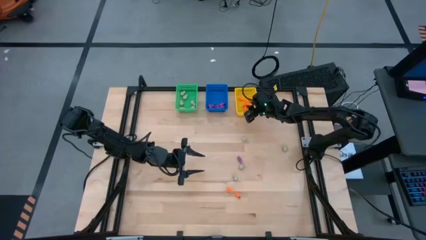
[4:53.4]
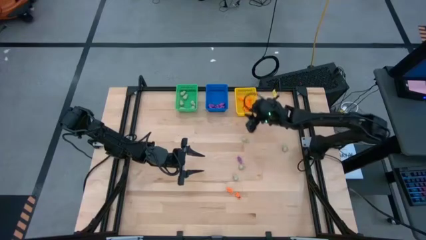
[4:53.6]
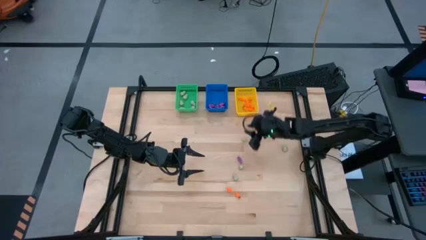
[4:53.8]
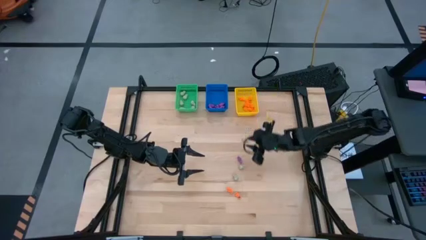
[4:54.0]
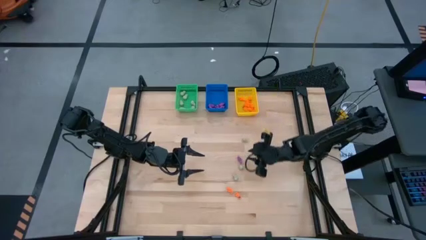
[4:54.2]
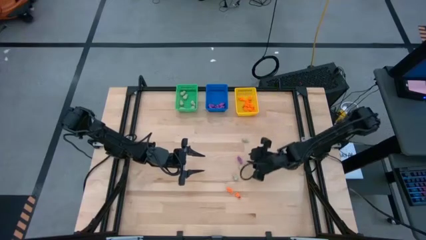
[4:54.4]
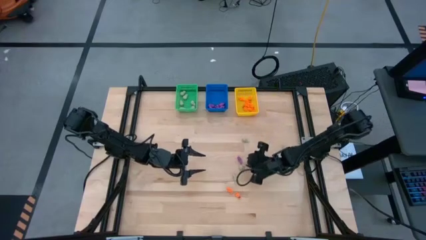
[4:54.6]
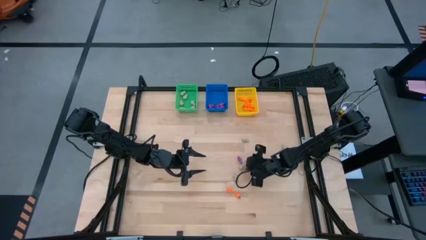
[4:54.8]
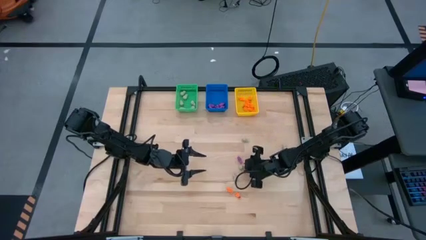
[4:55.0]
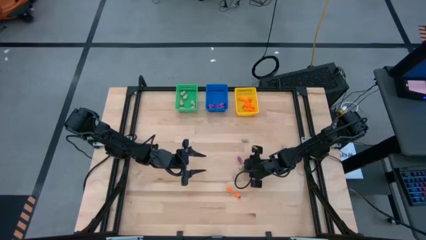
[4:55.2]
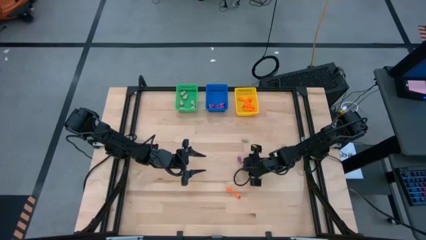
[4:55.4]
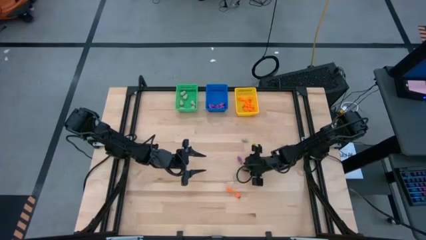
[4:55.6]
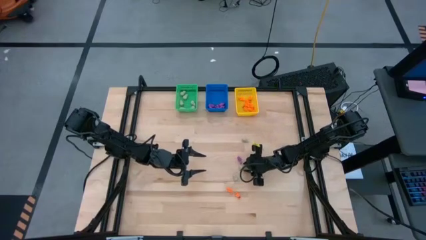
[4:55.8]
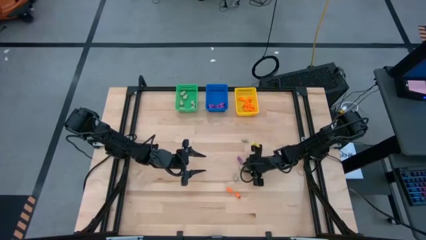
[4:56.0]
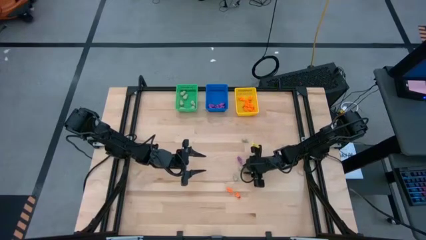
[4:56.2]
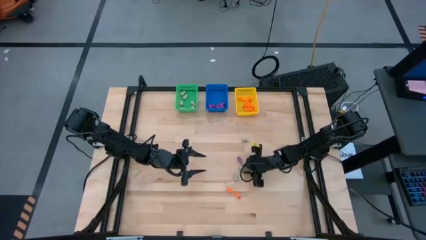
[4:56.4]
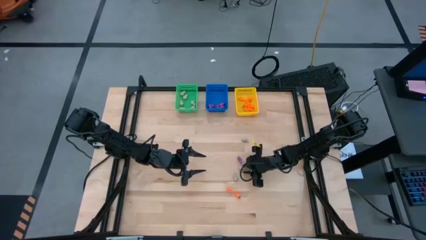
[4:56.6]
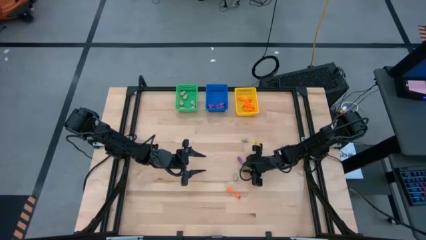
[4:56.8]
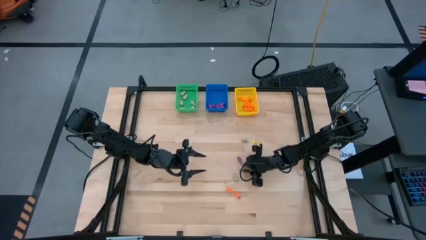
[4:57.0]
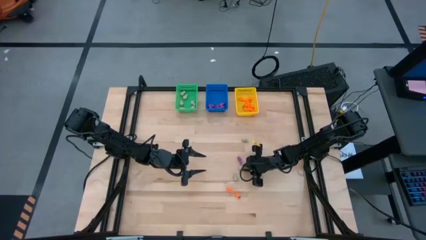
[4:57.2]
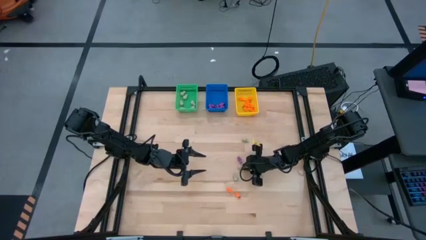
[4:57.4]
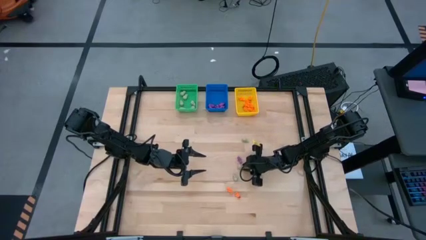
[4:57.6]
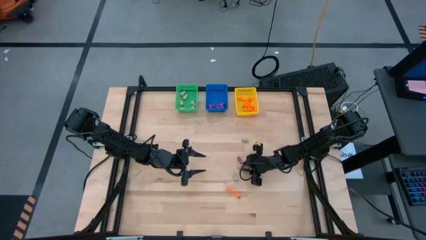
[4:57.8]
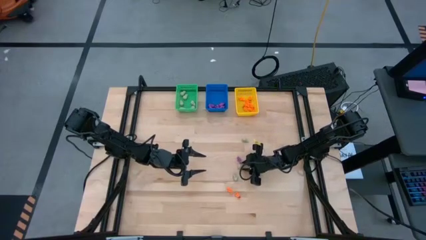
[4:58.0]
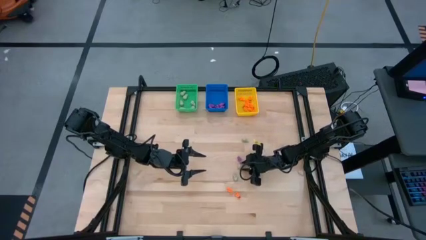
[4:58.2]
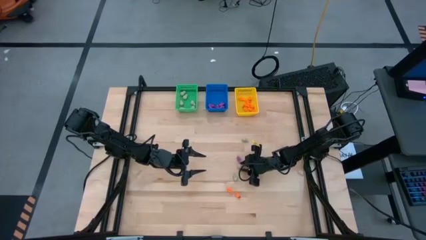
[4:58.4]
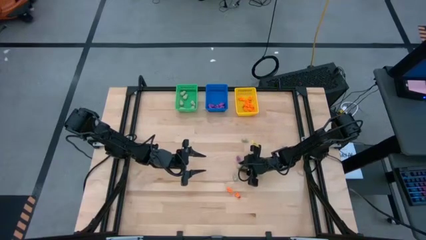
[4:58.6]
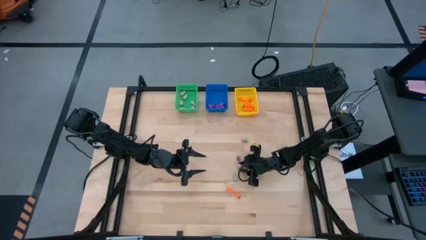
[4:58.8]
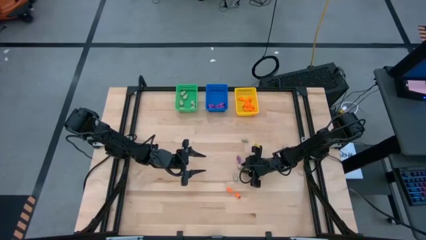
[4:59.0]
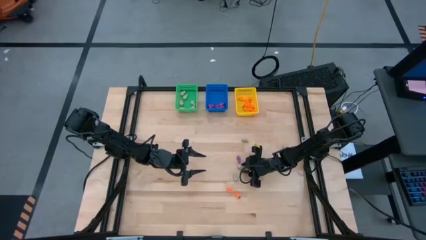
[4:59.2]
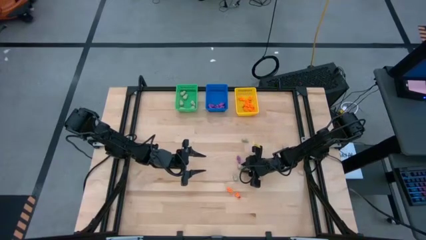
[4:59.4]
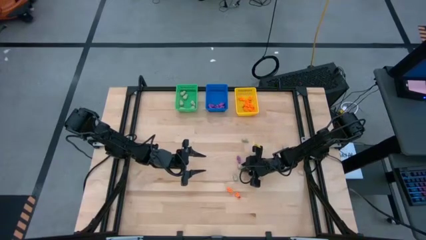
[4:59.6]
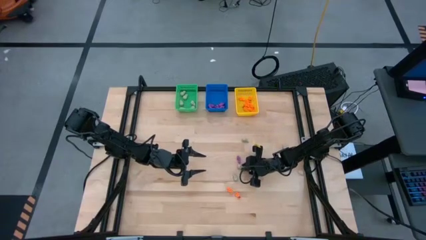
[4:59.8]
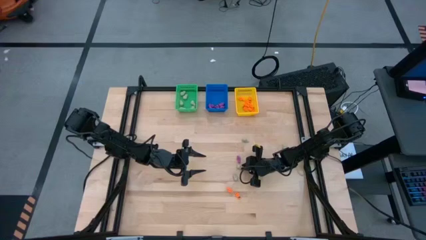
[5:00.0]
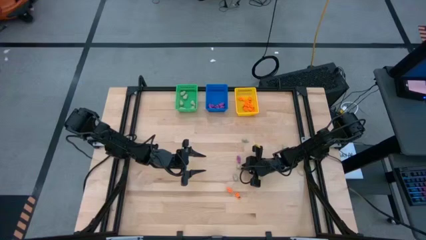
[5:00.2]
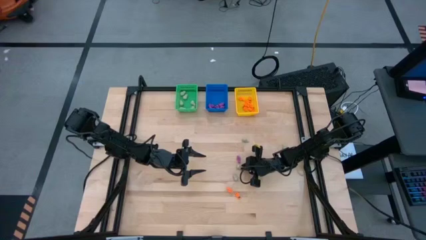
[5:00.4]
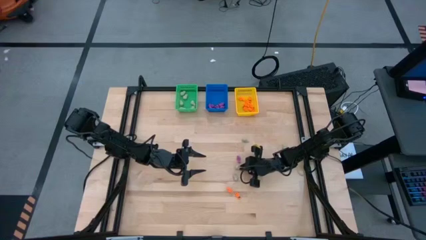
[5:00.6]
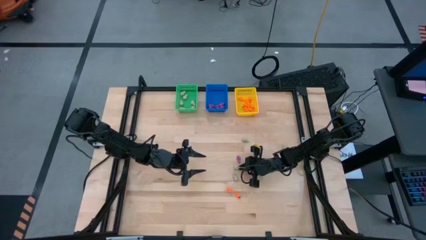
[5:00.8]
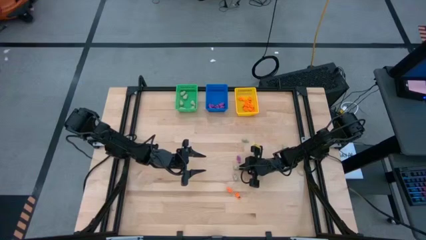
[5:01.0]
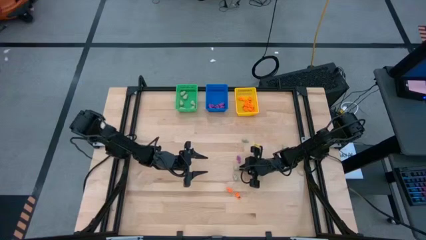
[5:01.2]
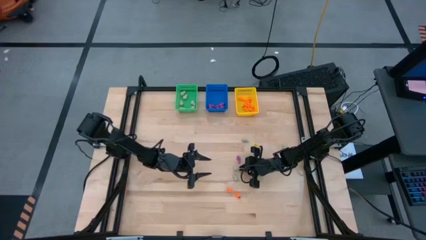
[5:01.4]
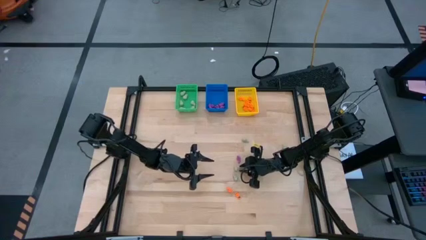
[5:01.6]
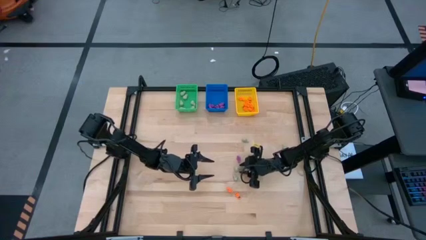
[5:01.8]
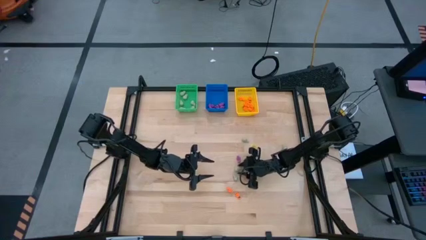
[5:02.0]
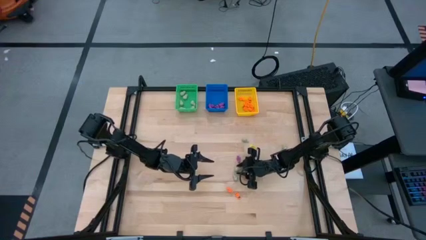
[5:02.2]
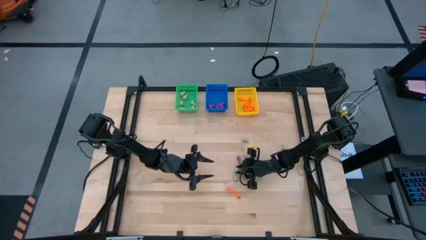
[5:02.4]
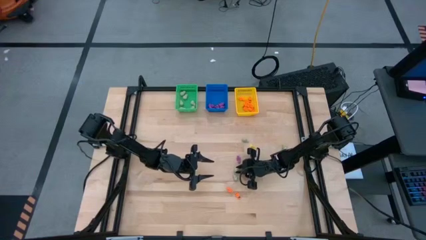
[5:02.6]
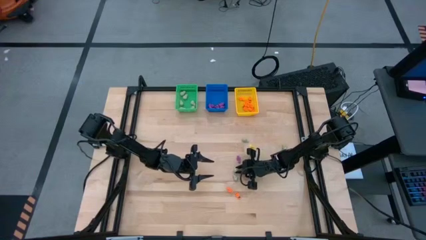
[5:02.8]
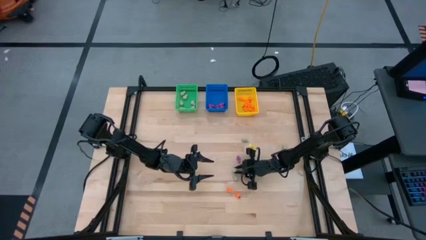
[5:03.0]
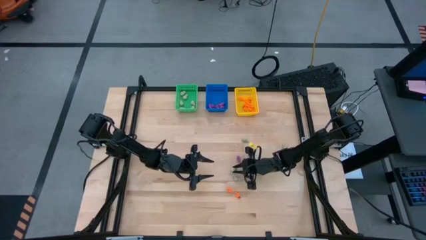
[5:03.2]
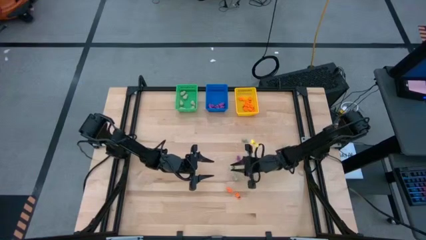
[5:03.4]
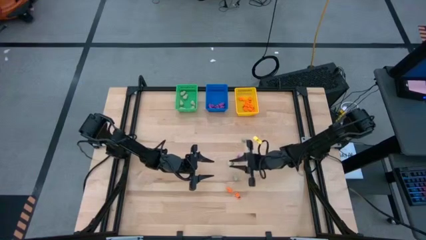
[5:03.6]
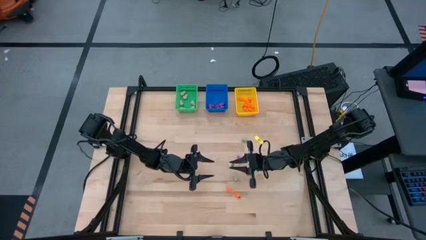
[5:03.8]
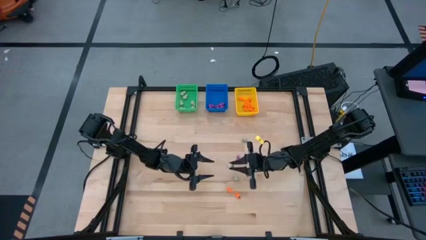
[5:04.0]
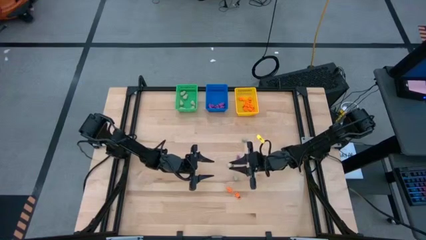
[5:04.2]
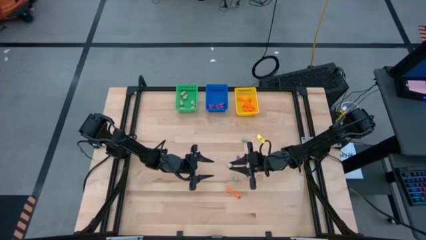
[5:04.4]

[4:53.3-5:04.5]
Task: Sort Halloween decoration
Put the gray skull toy into the green bin

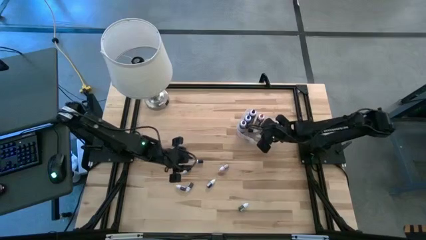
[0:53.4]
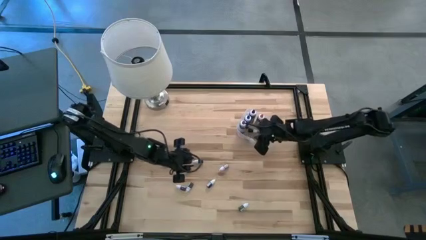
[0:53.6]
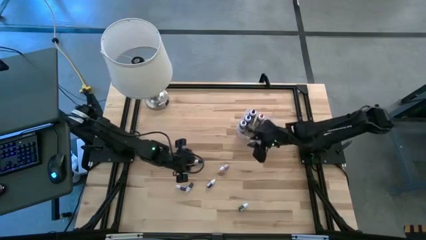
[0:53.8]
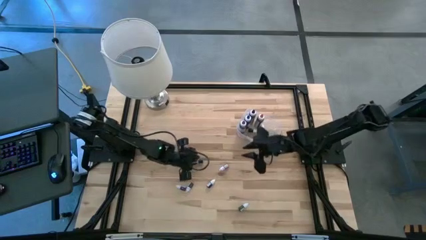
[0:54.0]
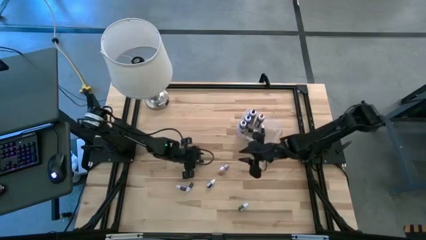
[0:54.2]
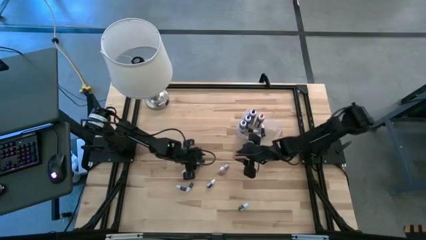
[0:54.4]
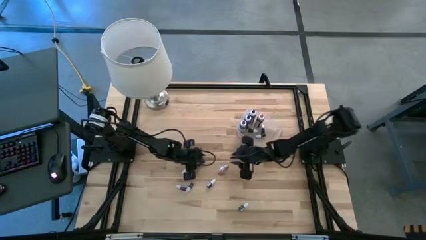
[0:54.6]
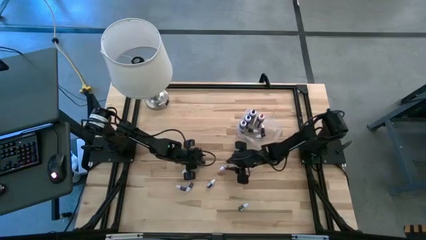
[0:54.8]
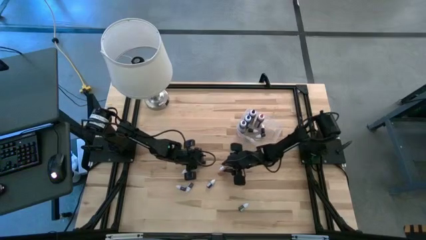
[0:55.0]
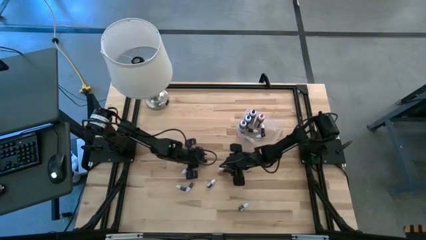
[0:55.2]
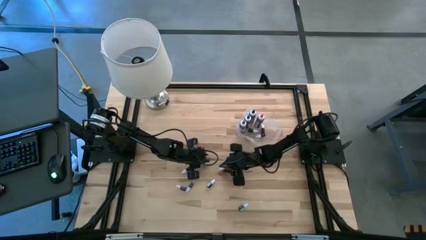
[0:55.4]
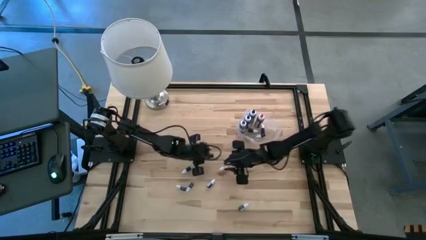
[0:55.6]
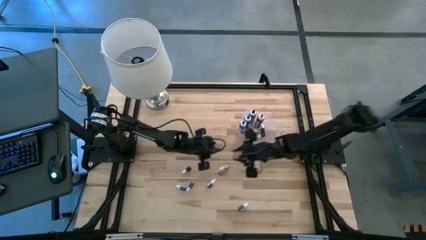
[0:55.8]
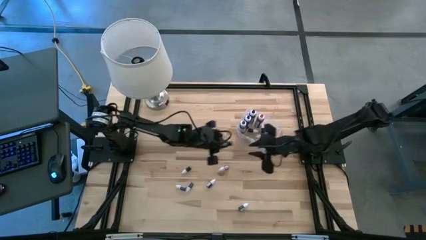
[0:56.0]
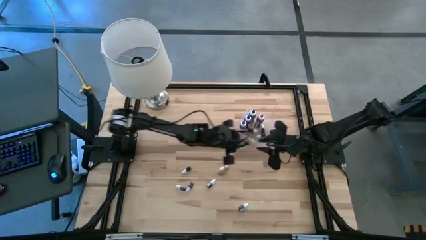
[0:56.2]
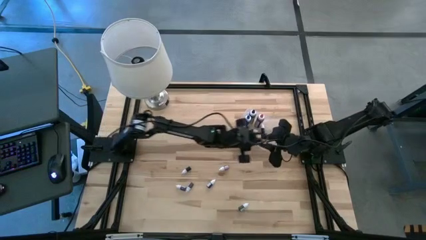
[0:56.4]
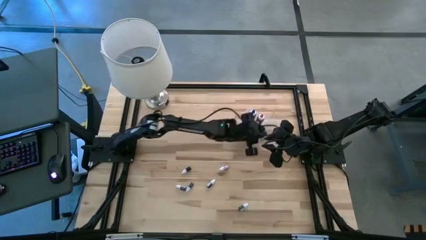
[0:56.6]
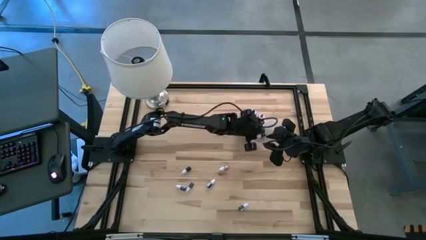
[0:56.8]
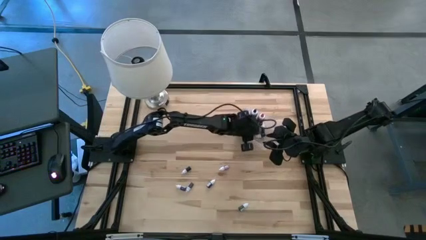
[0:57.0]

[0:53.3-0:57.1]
Task: Pick & Place food coloring
Put the small black food coloring bottle into the transparent bin

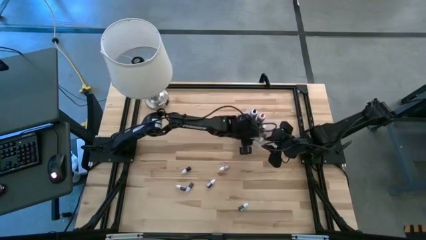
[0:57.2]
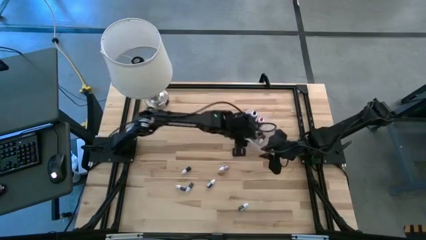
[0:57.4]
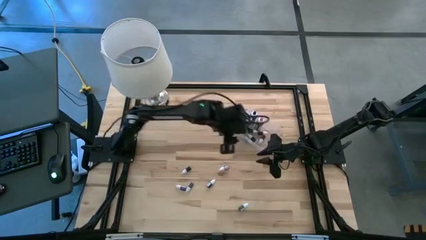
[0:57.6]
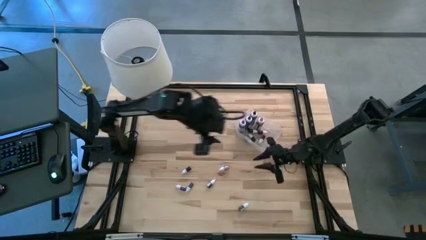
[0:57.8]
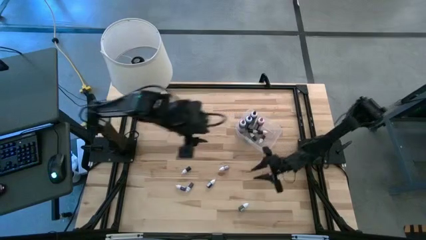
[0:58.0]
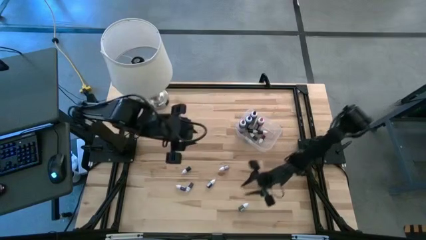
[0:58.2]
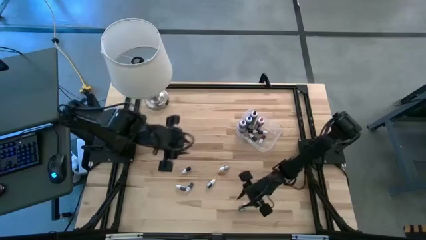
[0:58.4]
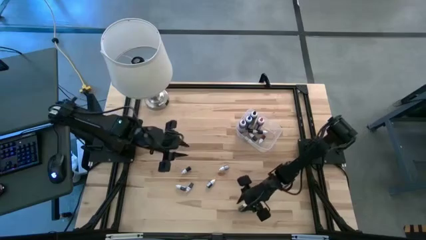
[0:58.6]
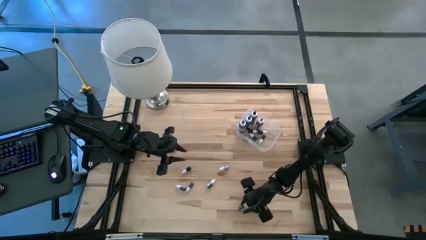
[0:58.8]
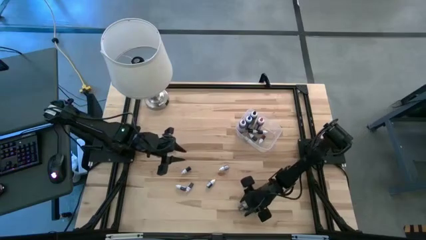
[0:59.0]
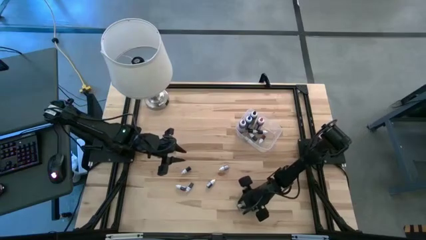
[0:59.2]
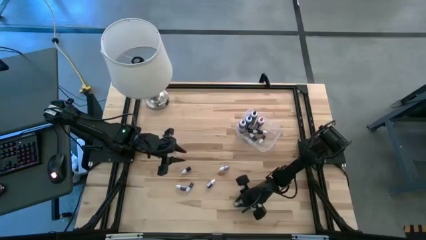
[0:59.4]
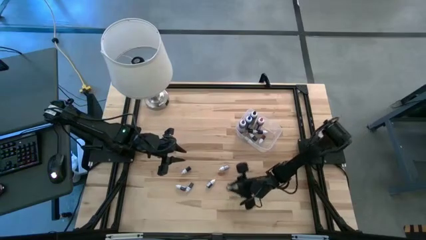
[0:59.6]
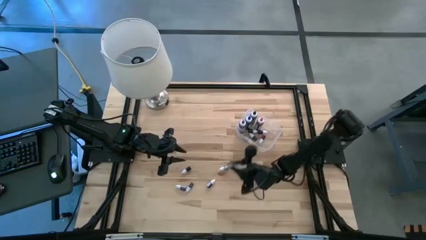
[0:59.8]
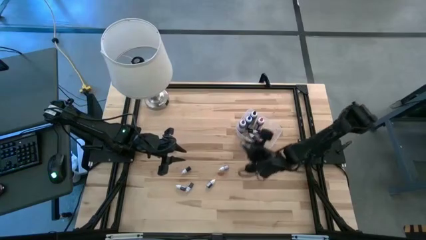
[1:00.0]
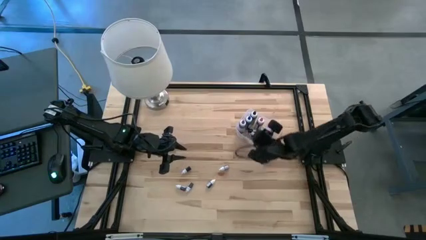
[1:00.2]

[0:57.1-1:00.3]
Put the top small green food coloring bottle into the transparent bin
